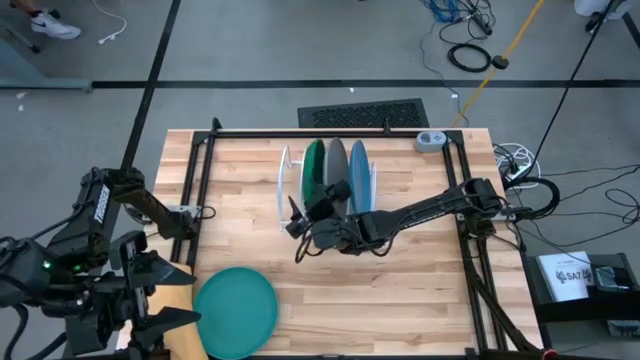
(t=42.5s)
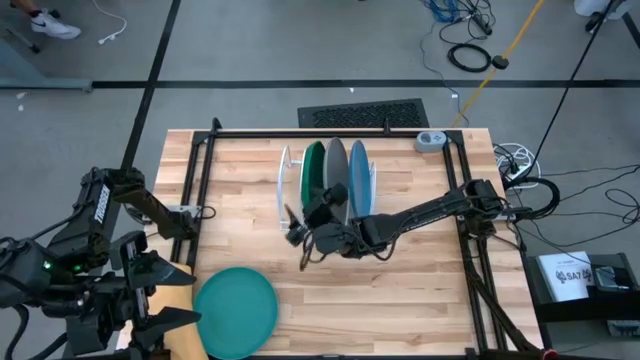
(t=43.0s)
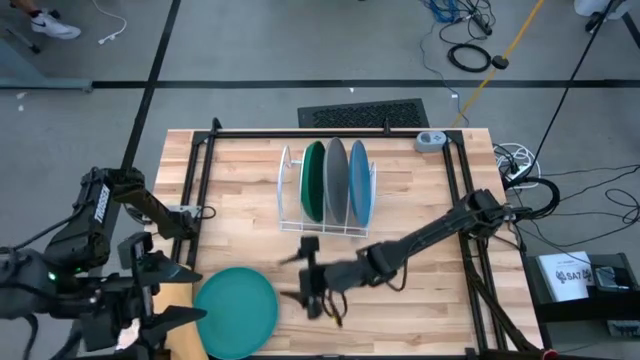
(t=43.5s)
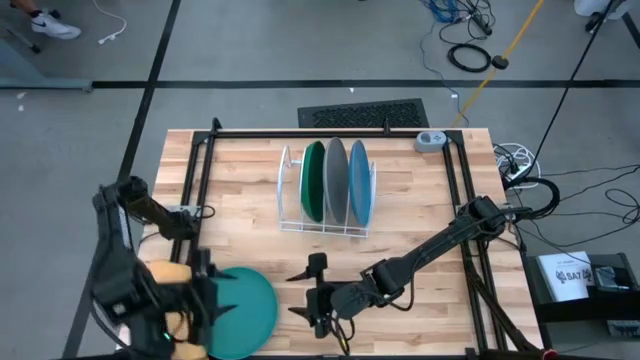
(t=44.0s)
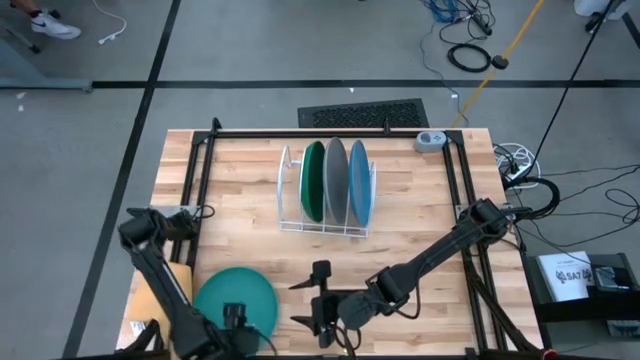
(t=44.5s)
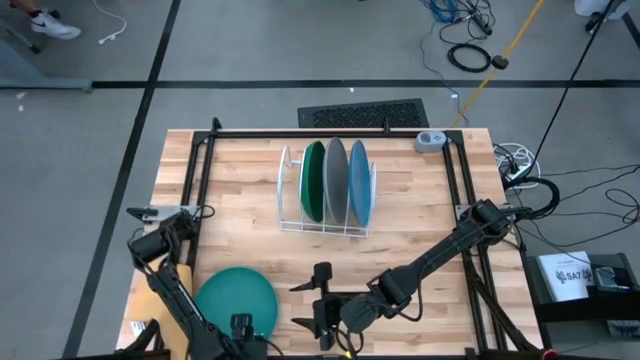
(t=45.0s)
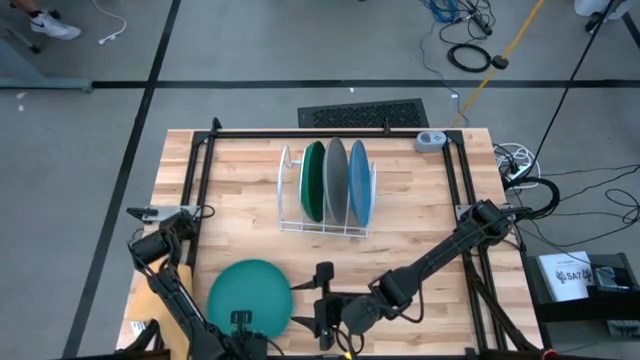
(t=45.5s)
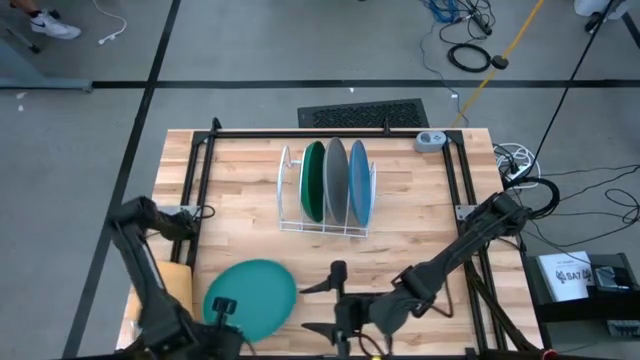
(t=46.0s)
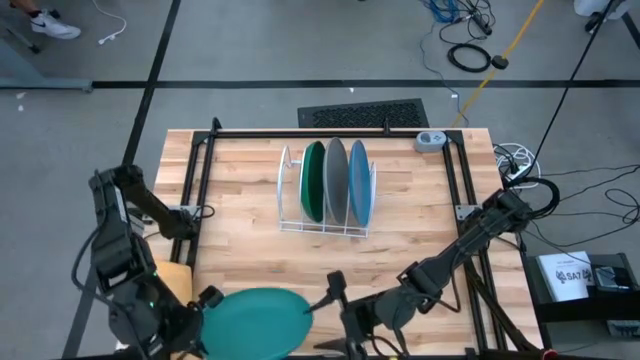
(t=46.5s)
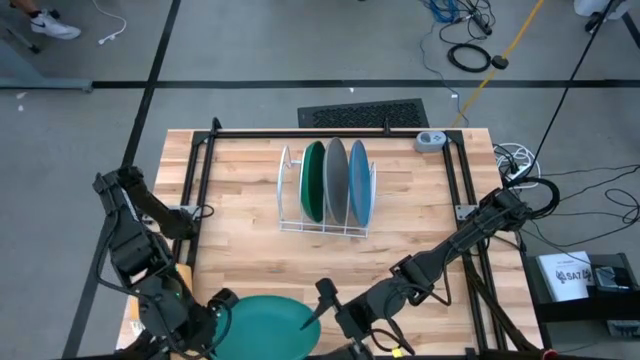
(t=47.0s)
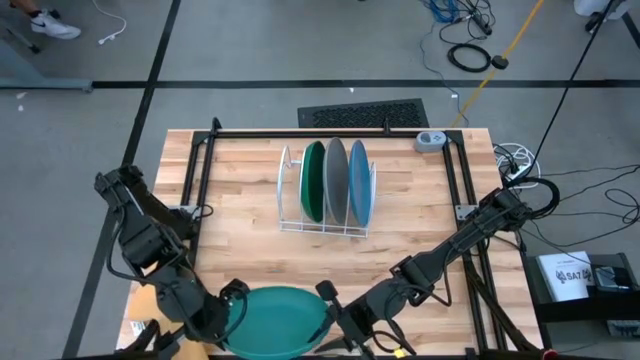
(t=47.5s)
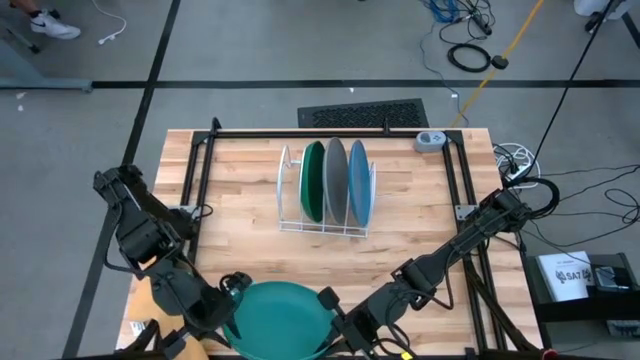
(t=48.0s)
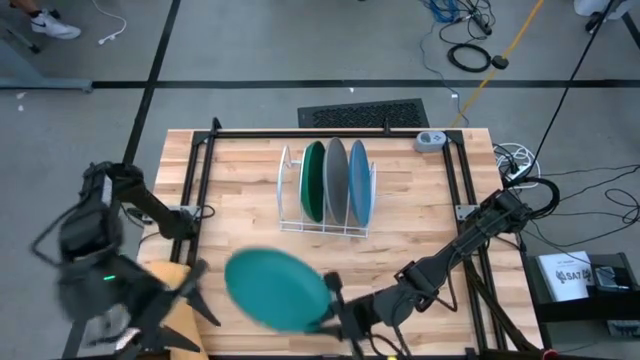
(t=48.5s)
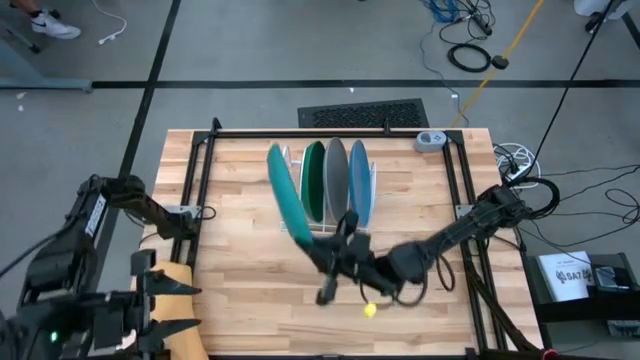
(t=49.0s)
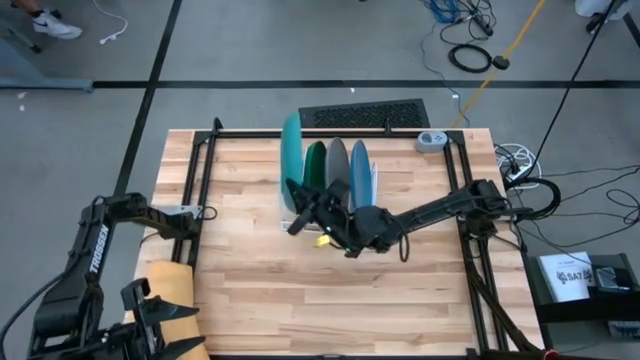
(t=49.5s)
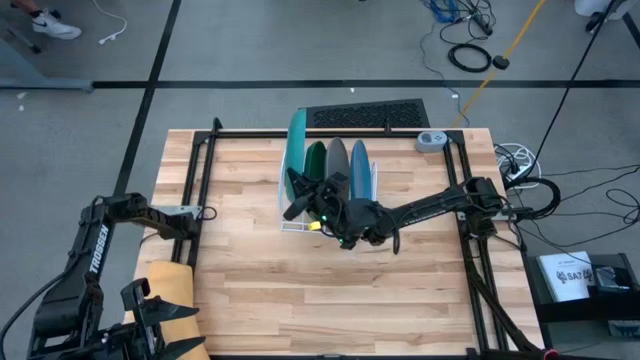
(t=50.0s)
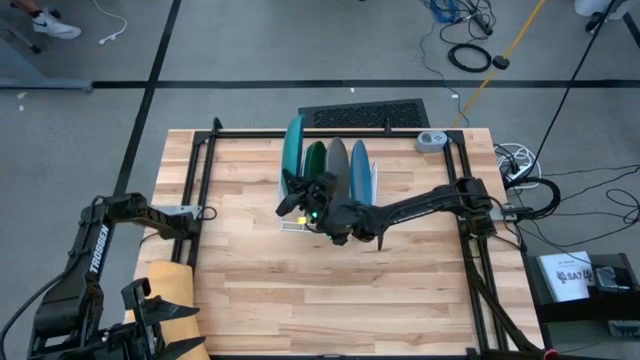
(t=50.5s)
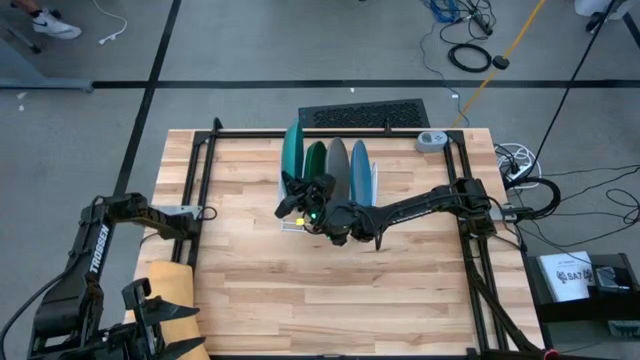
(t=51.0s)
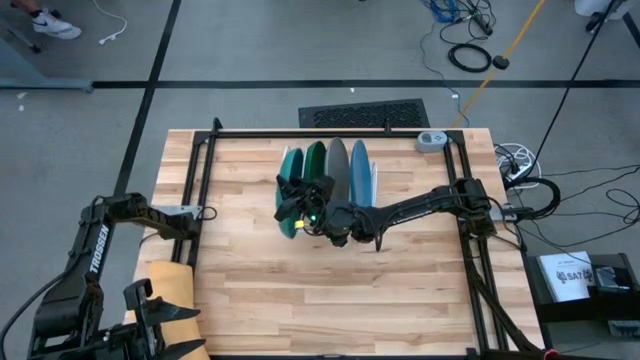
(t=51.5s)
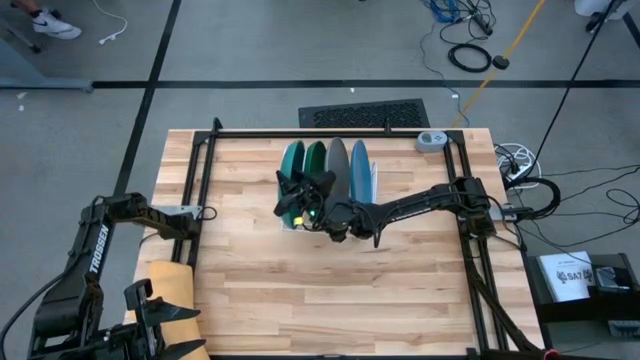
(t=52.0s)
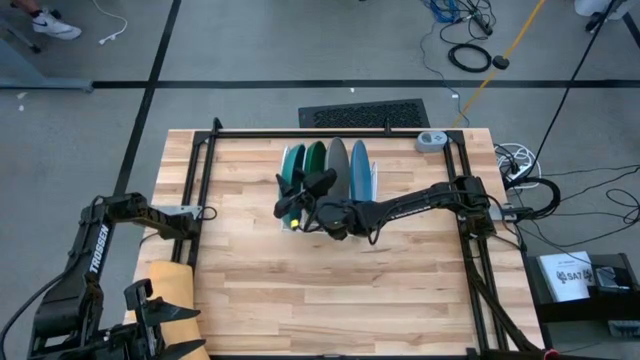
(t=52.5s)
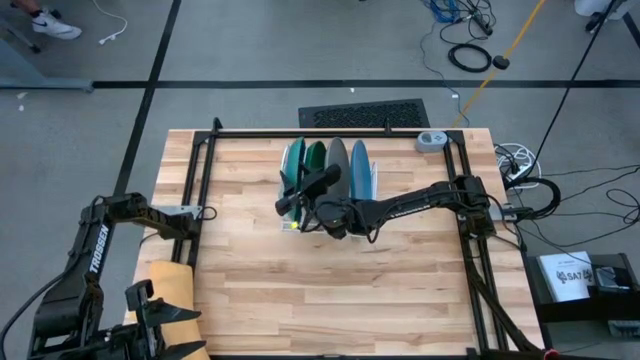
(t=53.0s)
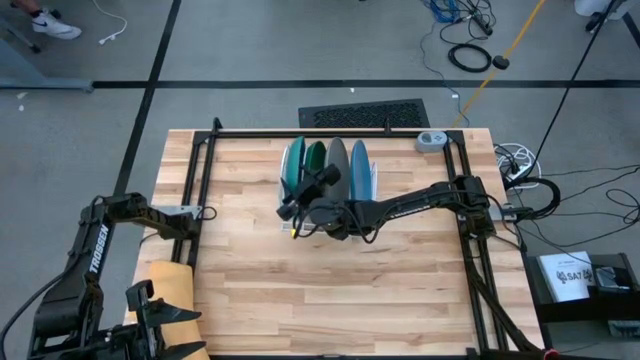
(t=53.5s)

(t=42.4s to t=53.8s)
Task: Sort dishes
Put the light green plate in the dish rack

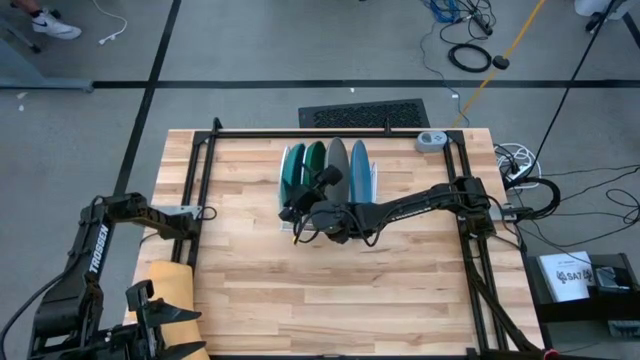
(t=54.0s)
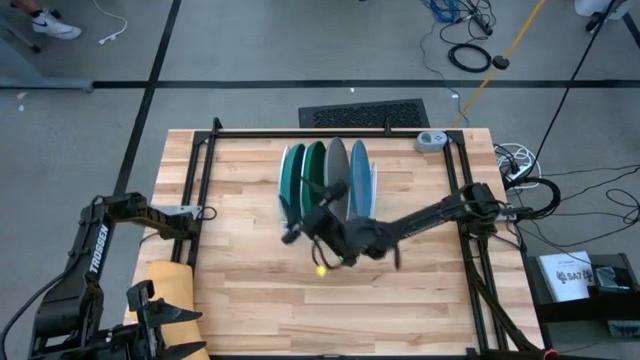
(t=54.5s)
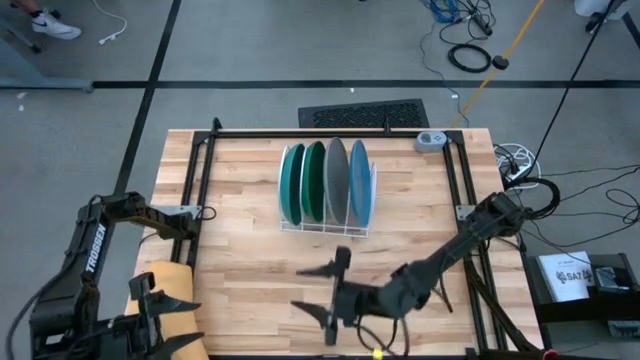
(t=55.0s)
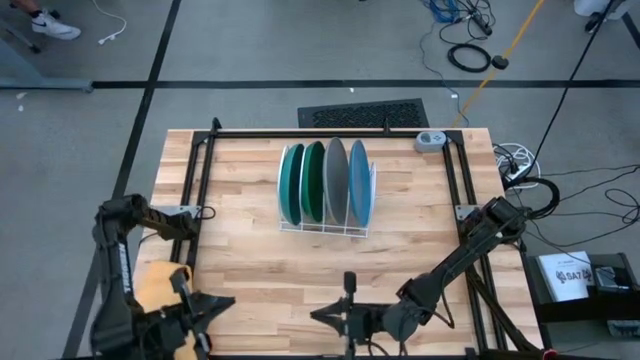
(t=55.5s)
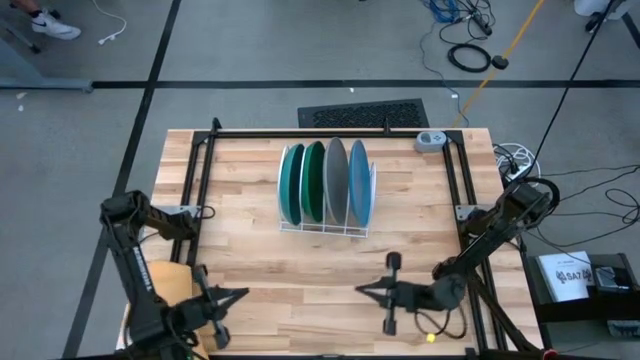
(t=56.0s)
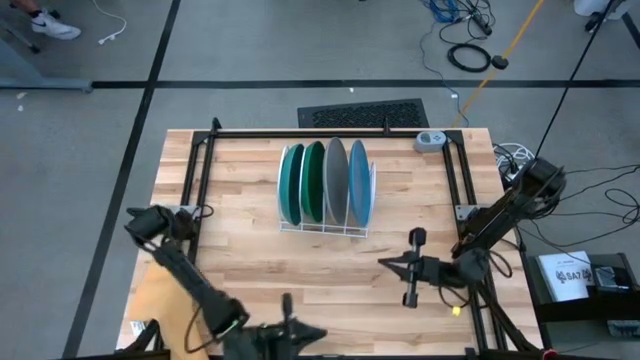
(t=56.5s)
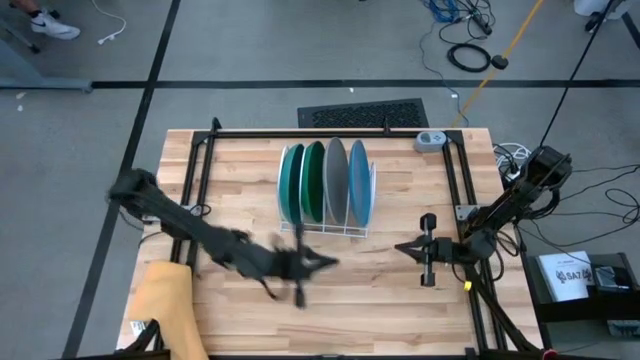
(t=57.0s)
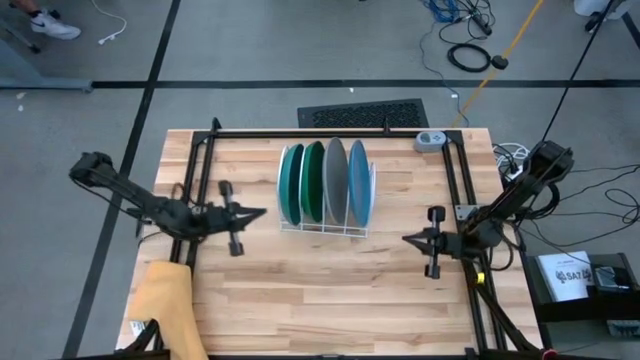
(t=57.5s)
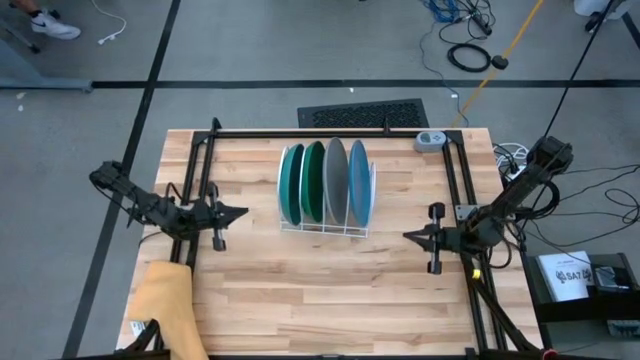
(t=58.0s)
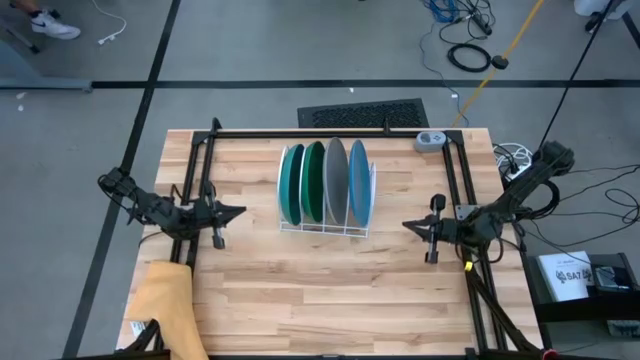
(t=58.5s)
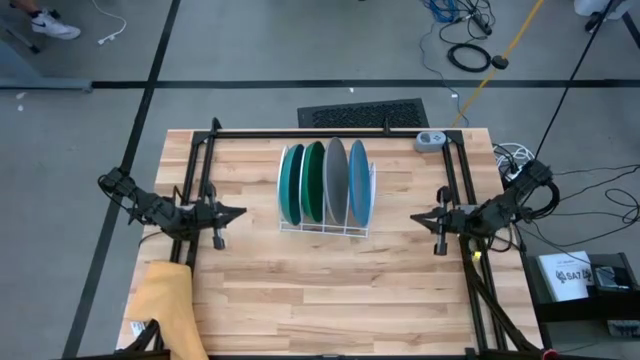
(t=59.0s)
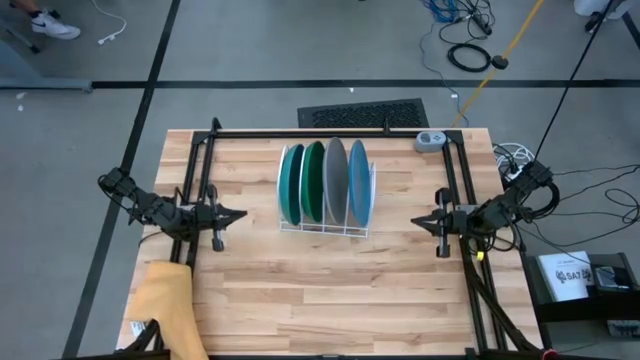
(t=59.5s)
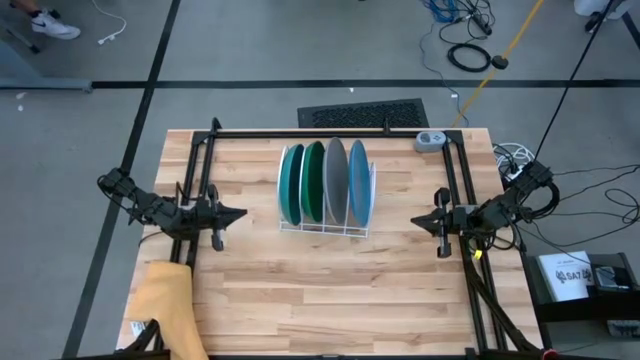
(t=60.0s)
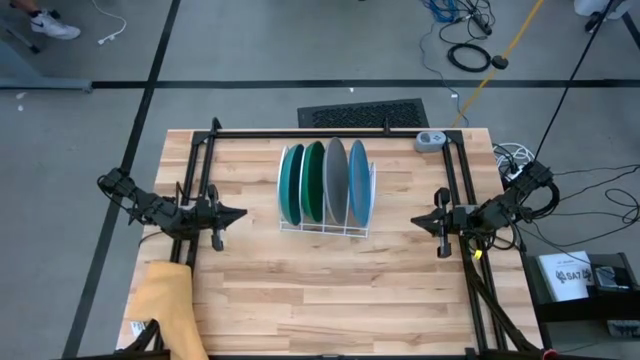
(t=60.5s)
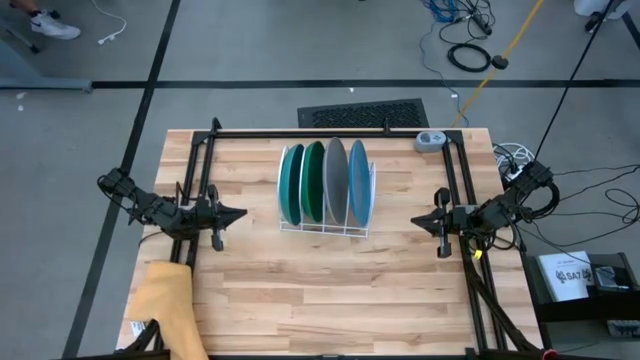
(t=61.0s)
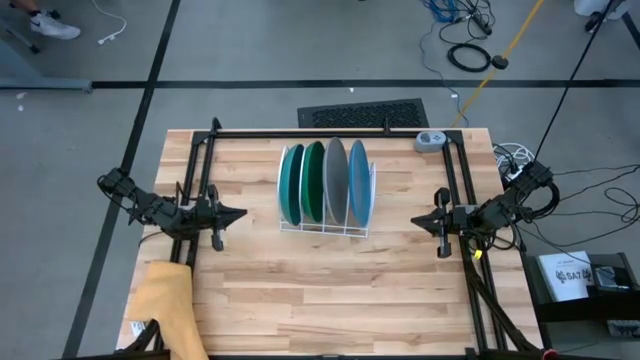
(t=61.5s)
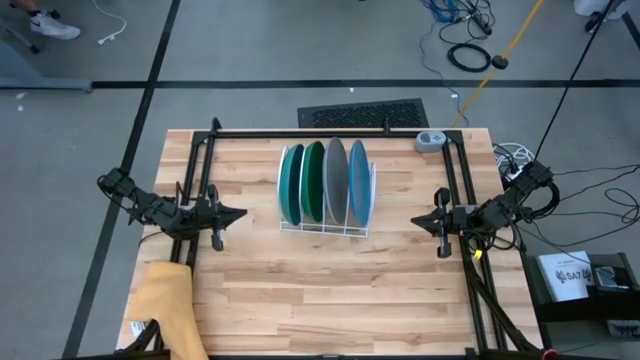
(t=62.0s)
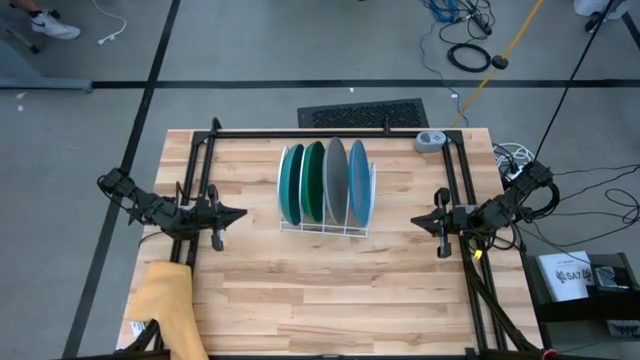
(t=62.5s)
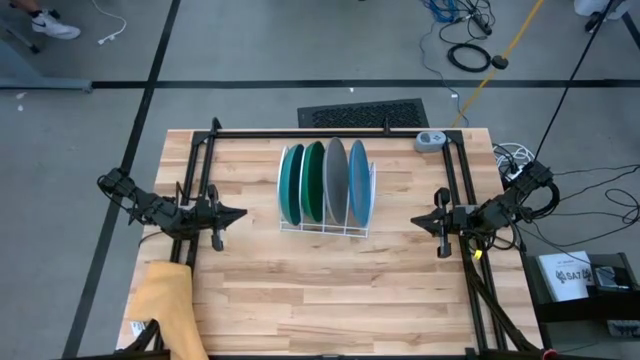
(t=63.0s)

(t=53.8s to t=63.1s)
Return to Home Position

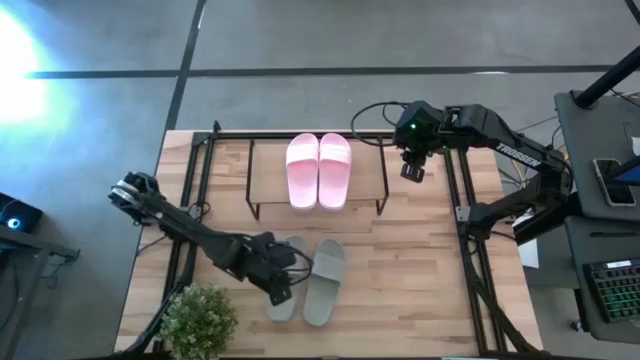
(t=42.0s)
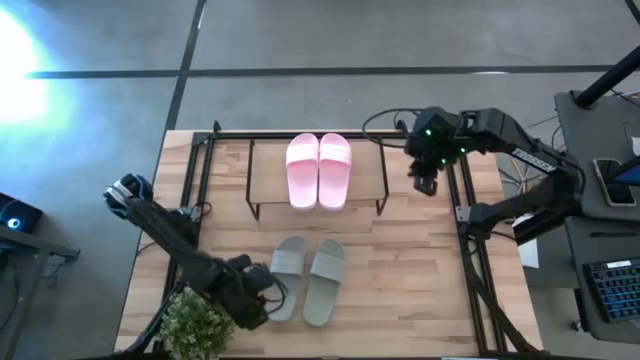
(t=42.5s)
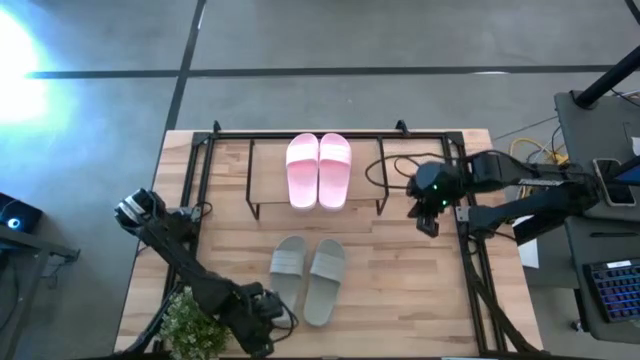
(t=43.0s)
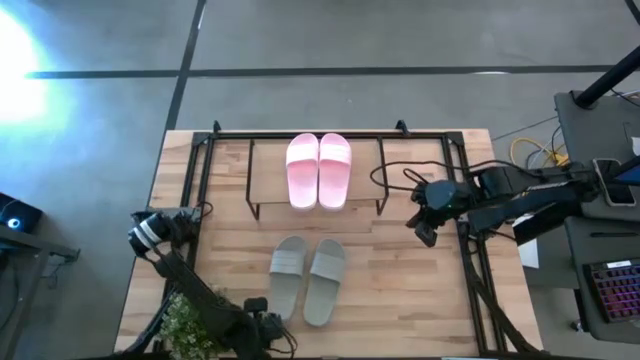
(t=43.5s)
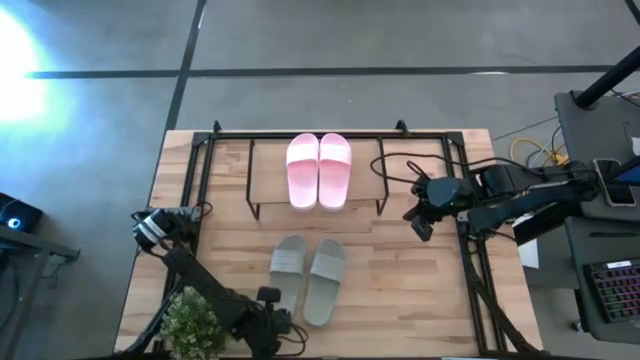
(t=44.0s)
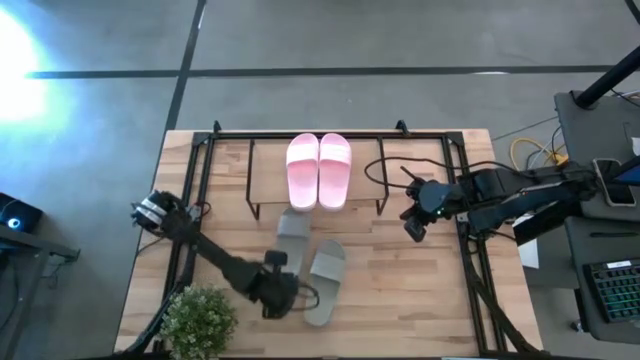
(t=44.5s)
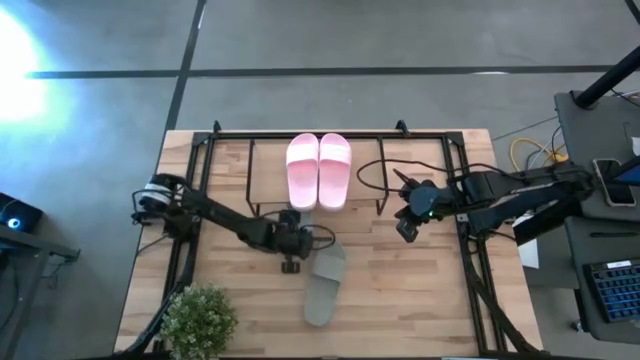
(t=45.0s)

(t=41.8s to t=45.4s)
Task: Pick and place slides into the shelf
Move the left gray slide under the shelf
